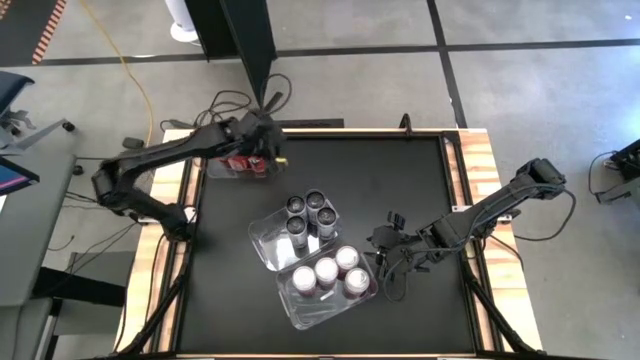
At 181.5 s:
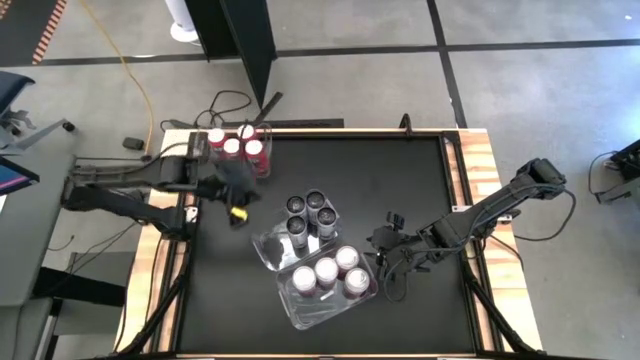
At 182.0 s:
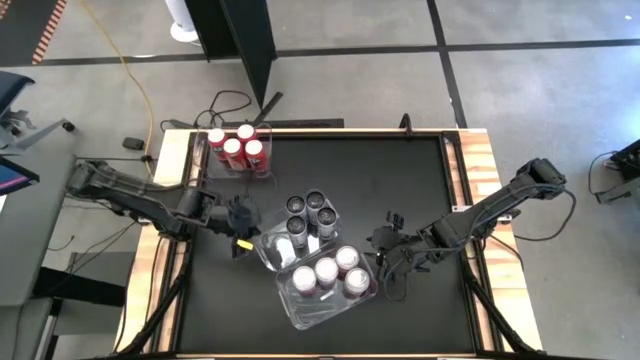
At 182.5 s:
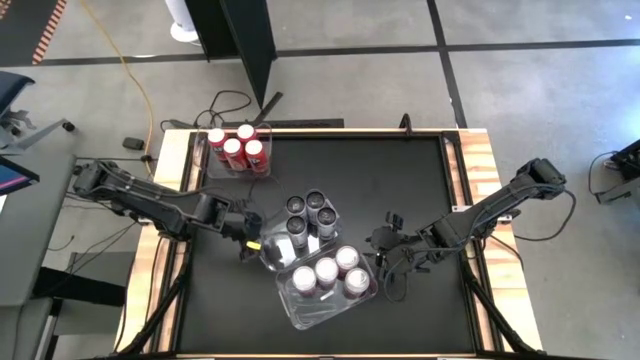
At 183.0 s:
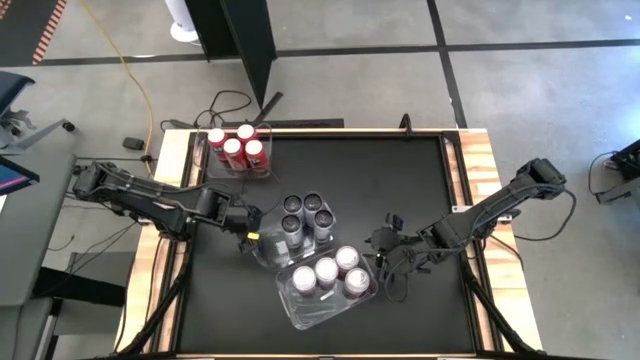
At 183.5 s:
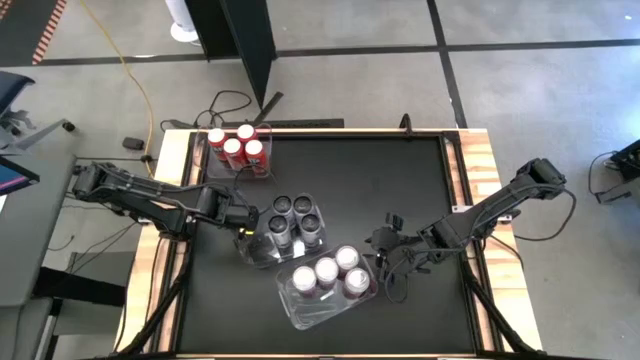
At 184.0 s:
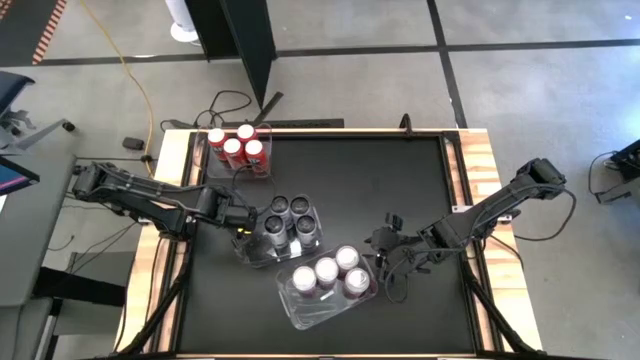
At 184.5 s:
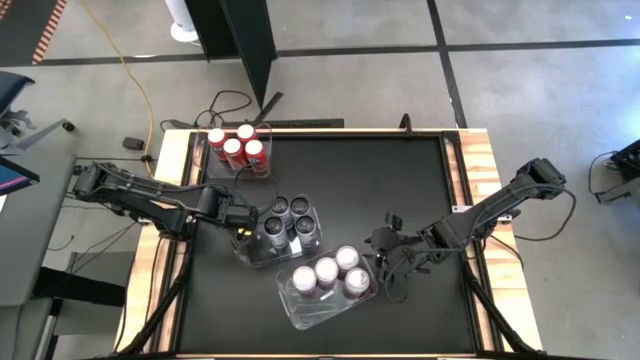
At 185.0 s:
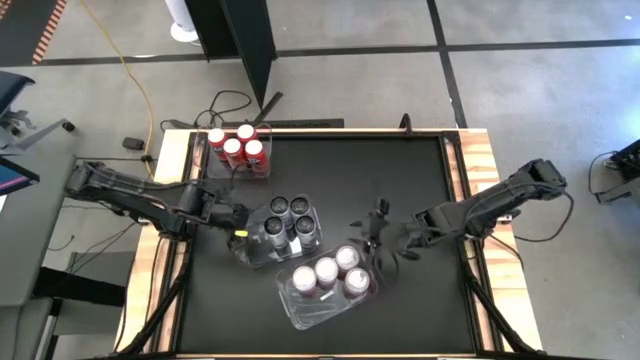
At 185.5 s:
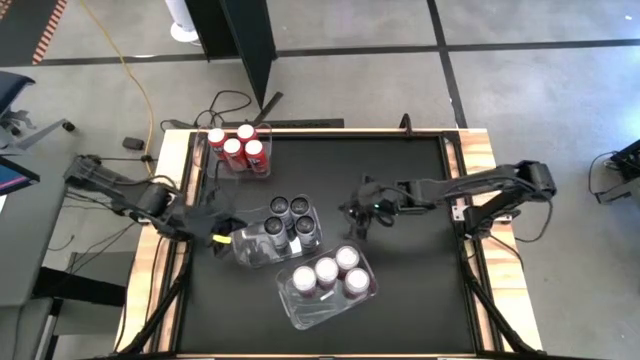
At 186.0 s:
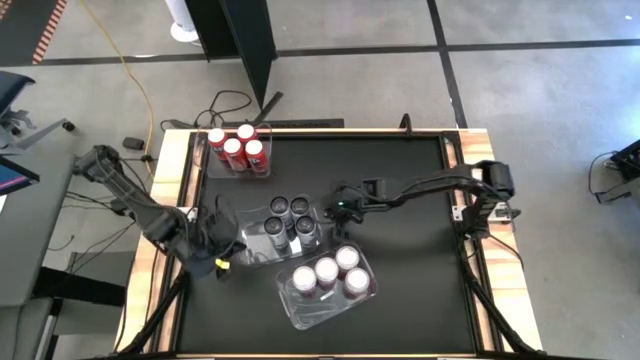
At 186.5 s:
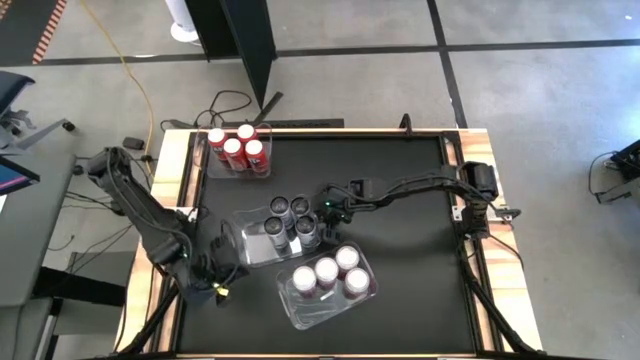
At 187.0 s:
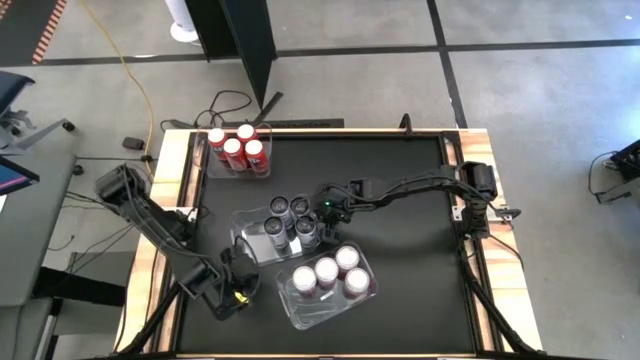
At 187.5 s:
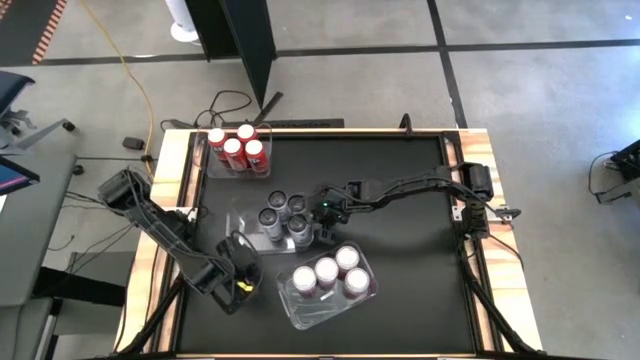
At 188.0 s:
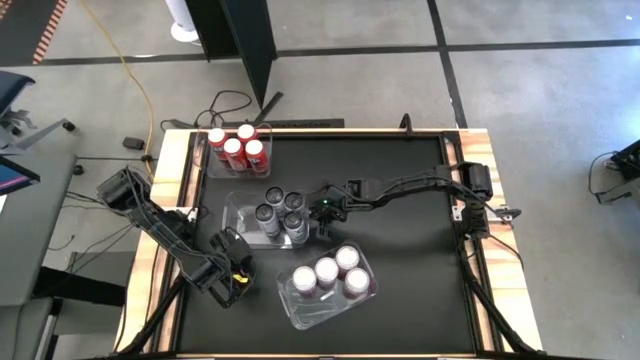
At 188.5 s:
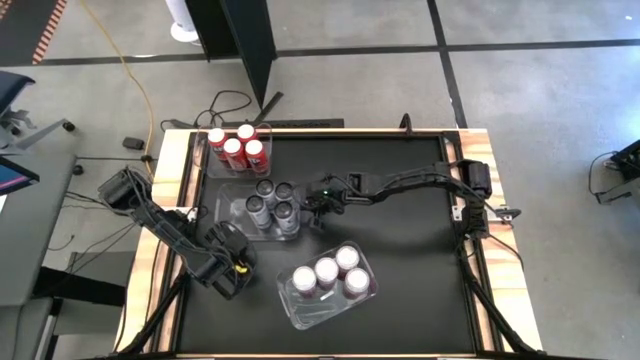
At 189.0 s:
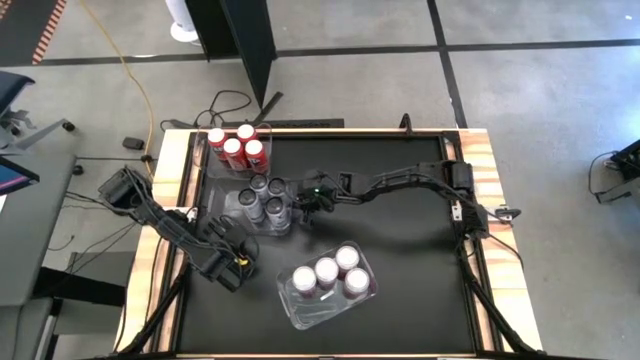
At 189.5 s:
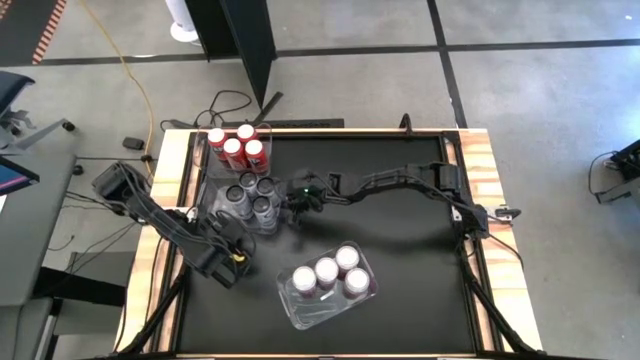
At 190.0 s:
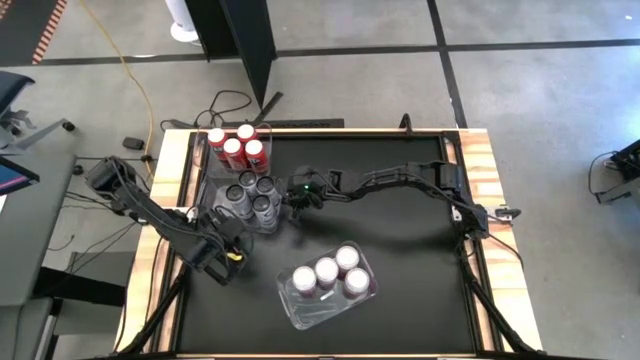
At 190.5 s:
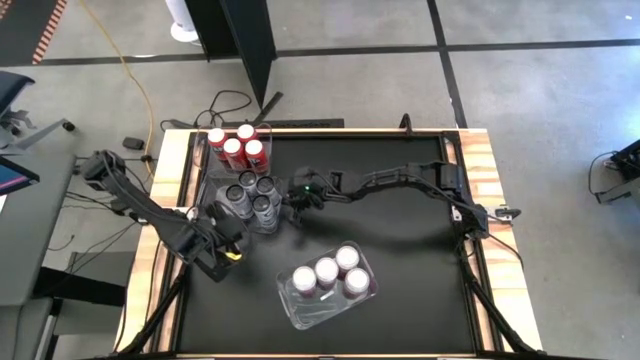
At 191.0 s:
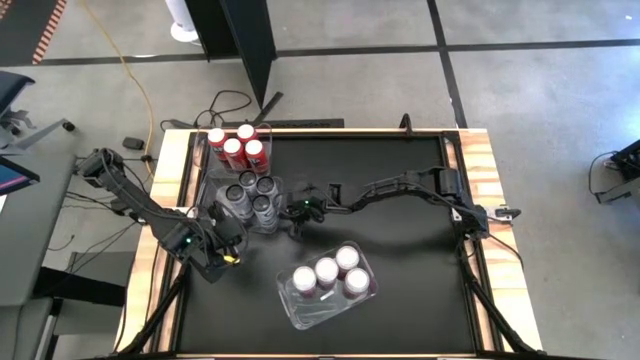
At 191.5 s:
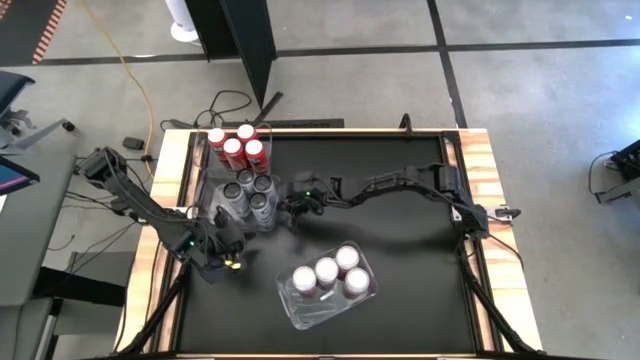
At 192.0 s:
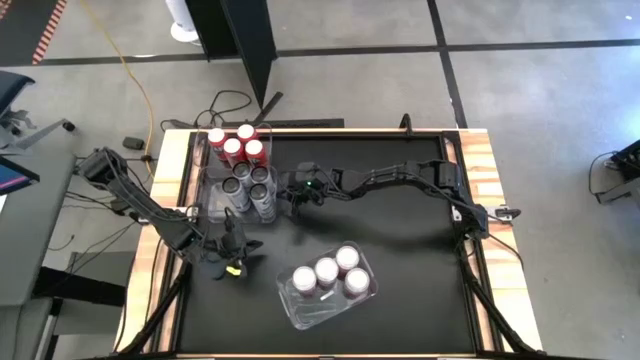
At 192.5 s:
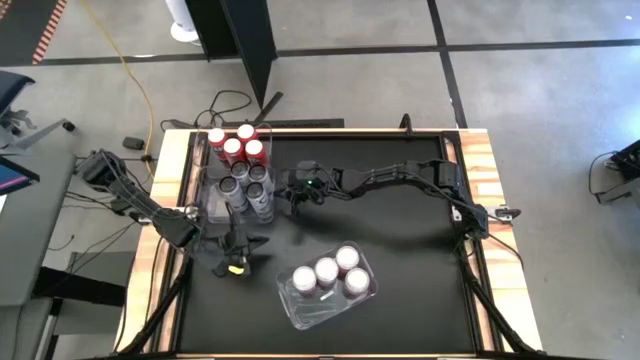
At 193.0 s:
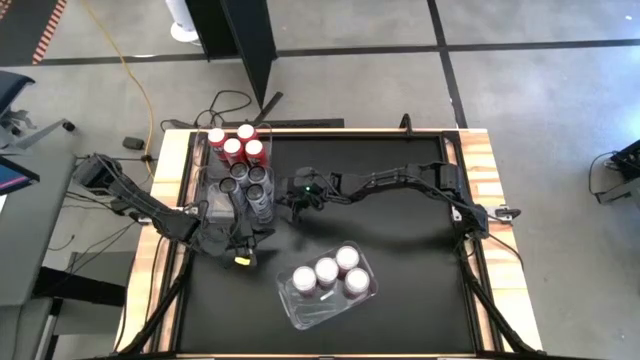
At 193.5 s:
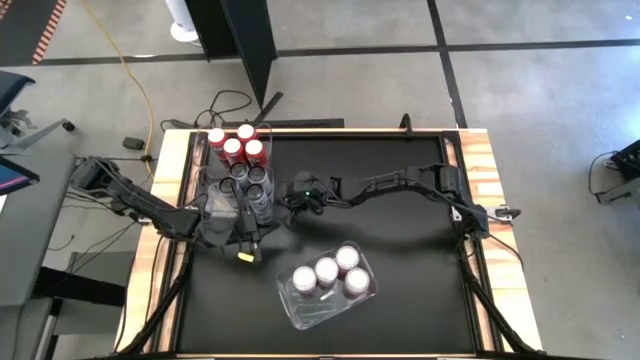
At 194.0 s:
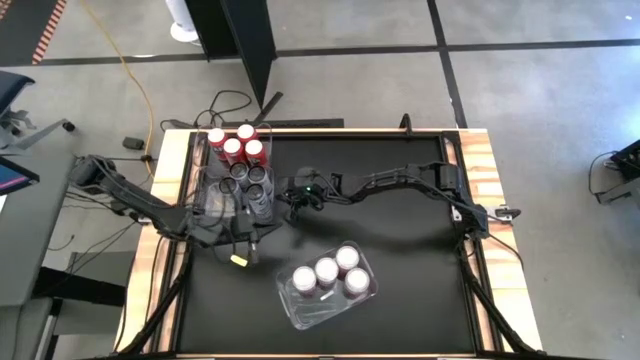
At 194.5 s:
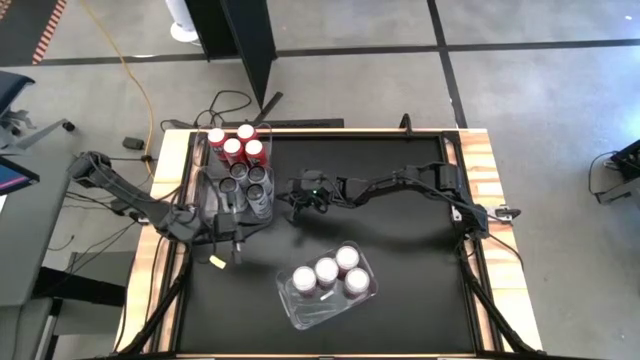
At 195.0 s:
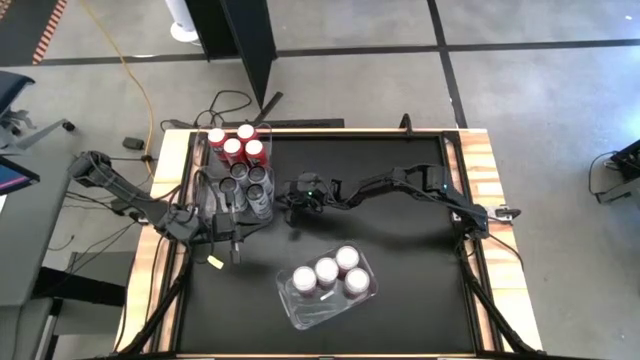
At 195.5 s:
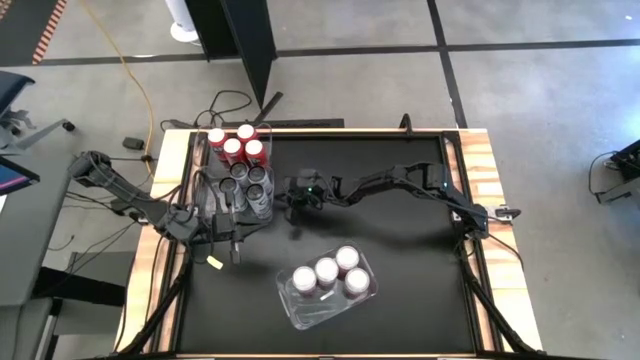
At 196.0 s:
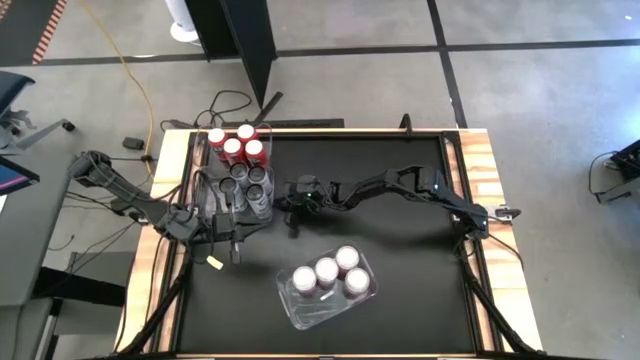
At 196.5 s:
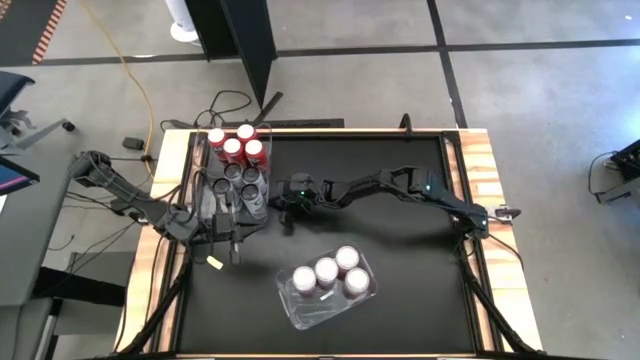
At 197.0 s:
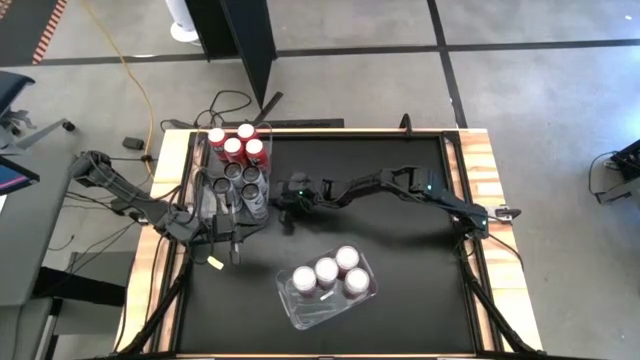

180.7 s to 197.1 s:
Task: Sort soda cans
Move the middle transparent bin to the middle left of the table

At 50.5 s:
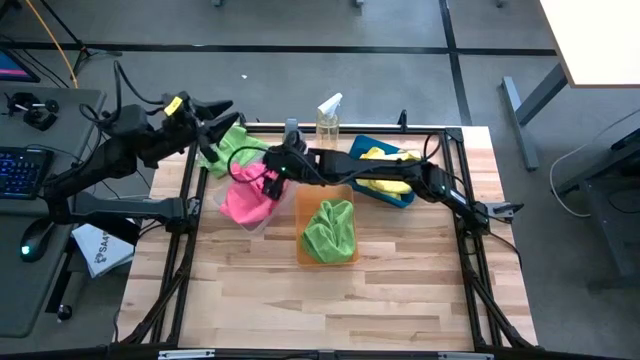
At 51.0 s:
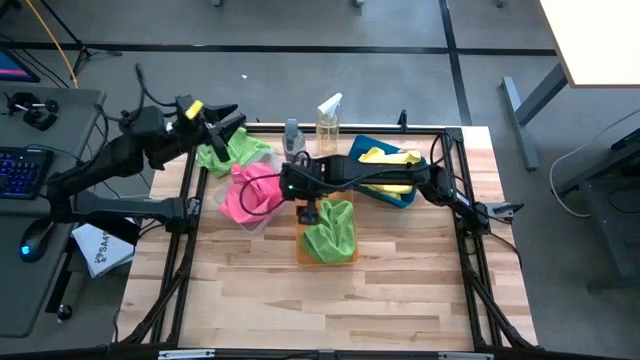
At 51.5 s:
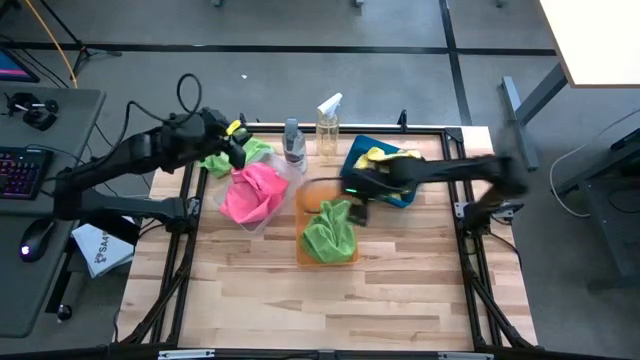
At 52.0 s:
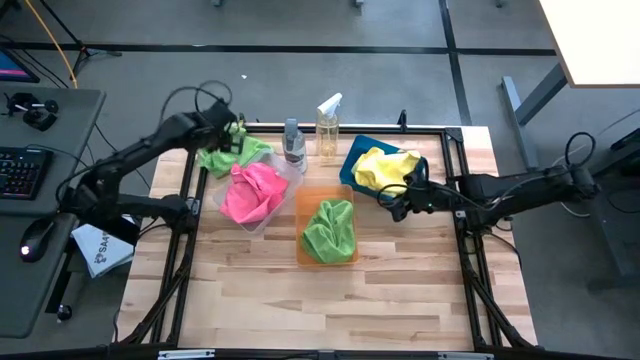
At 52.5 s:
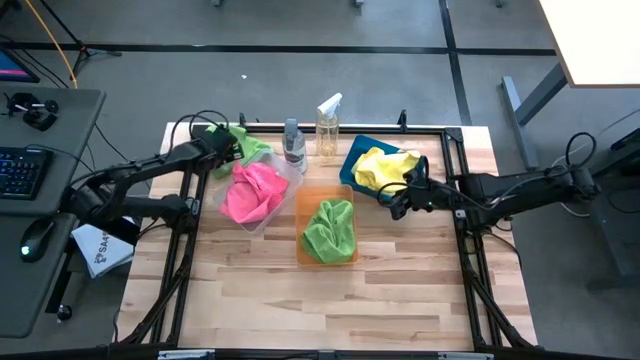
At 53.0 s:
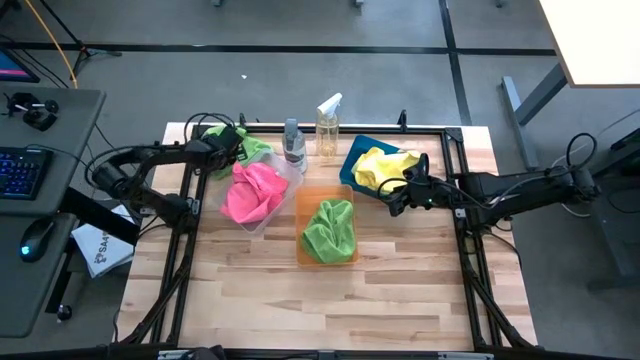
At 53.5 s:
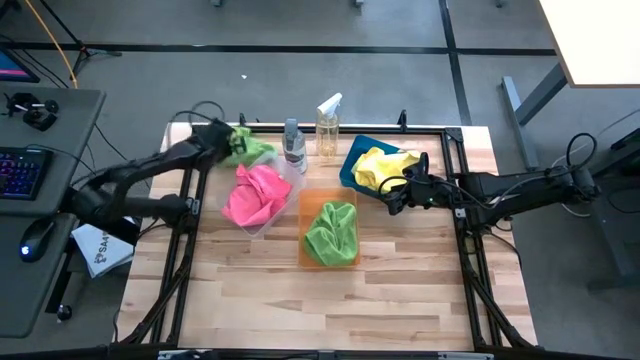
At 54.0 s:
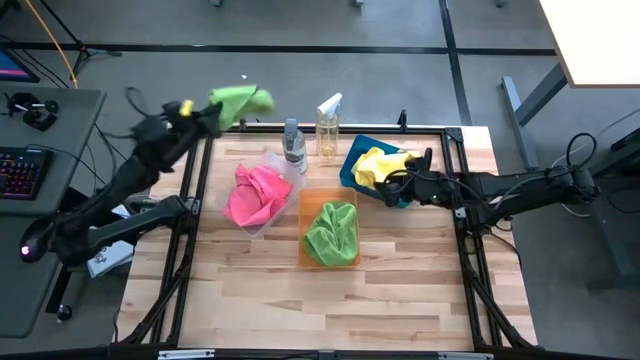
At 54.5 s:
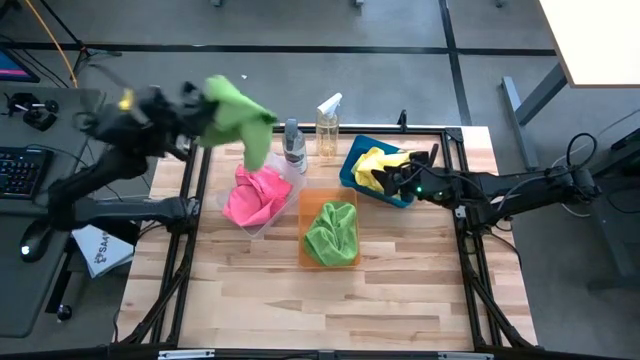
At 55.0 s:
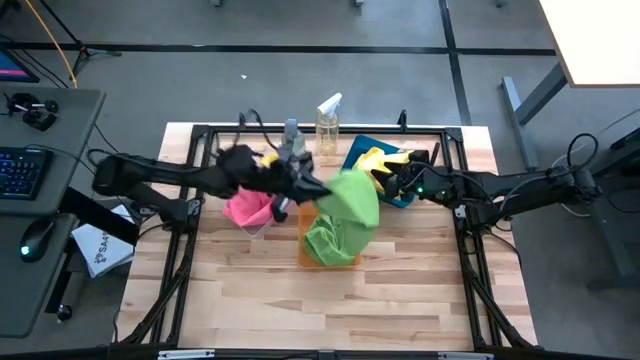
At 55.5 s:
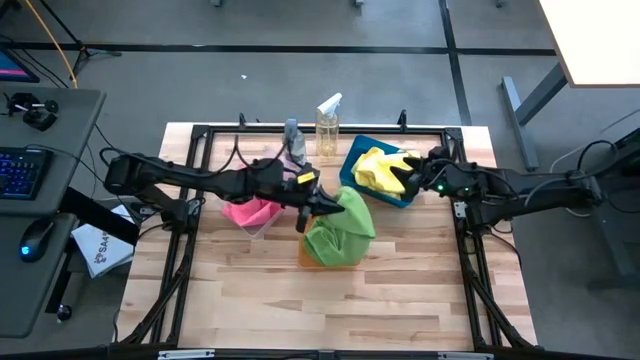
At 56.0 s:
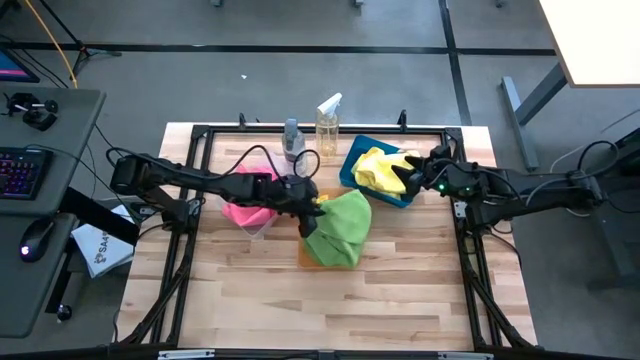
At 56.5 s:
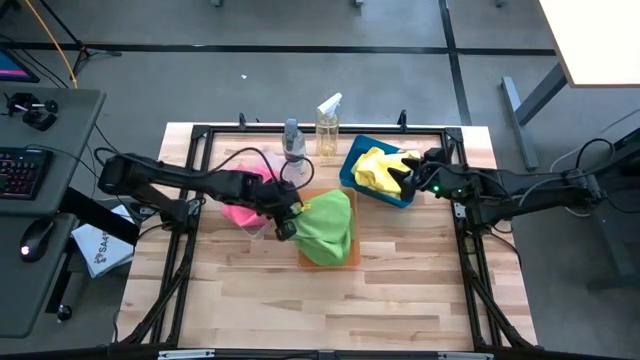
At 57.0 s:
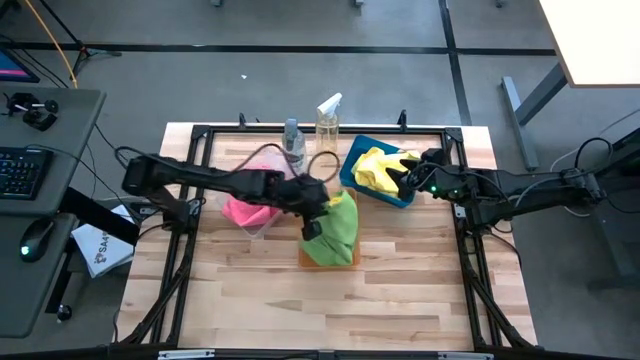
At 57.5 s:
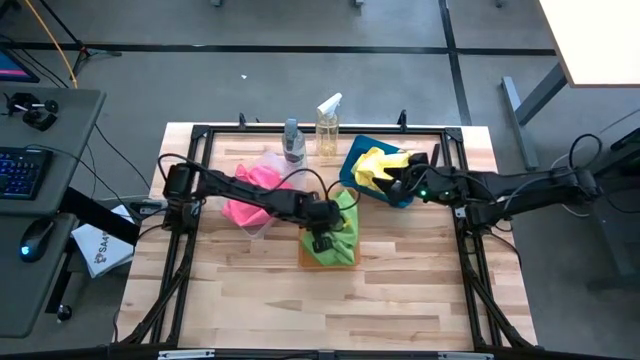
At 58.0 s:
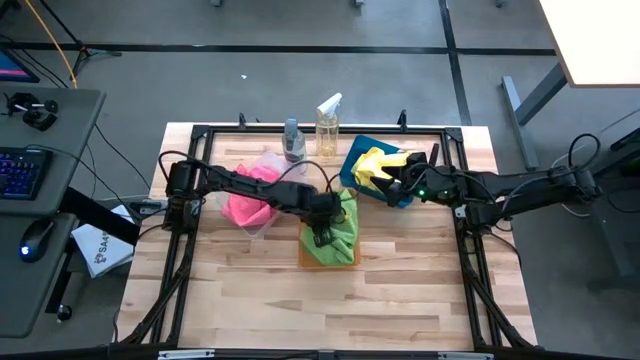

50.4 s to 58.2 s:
Task: Sort microfiber towel by color & place in baskets
Put the green microfiber towel into the orange bin
